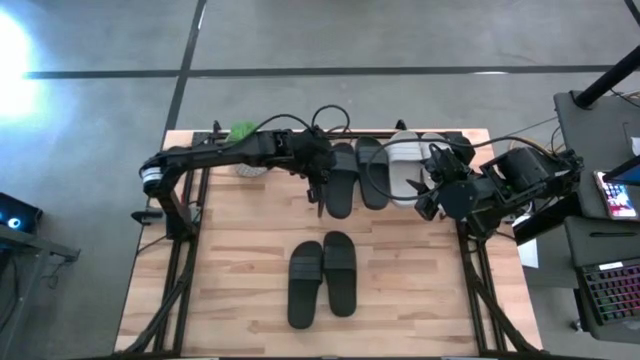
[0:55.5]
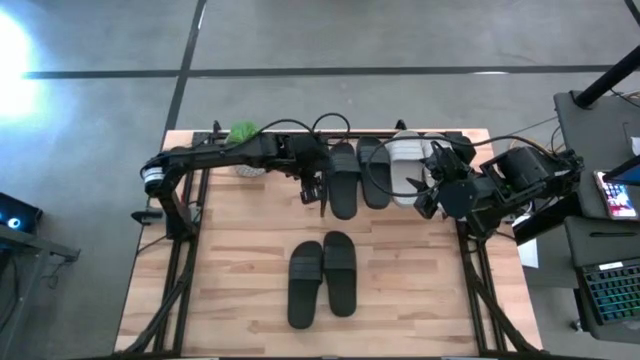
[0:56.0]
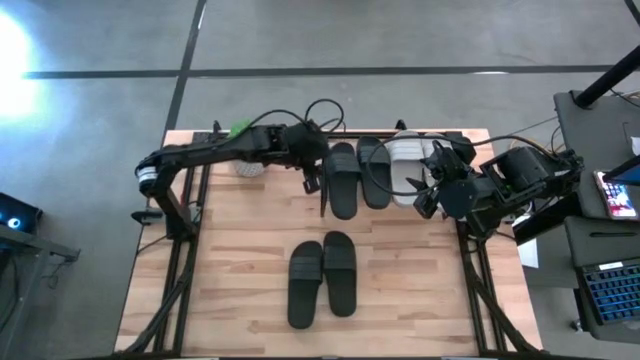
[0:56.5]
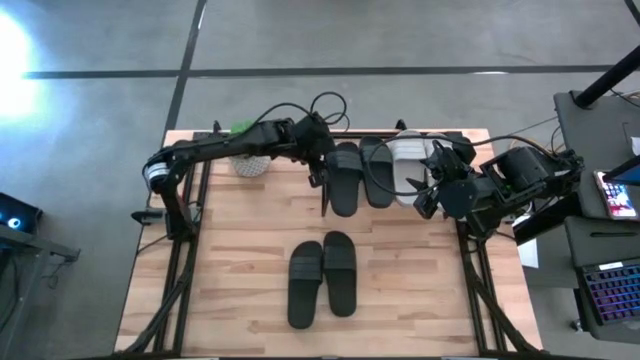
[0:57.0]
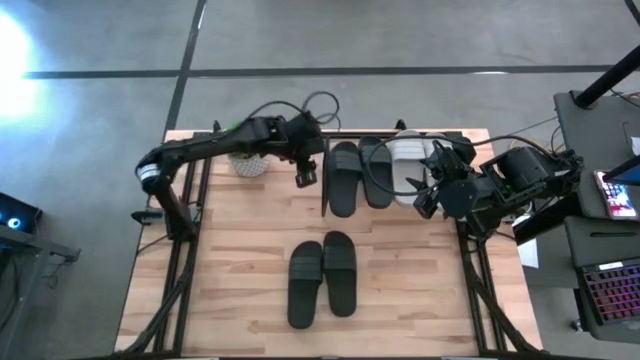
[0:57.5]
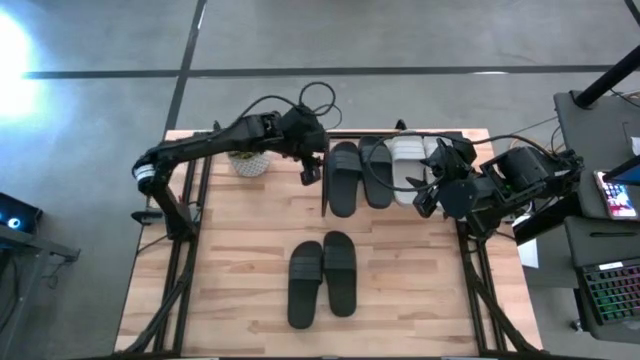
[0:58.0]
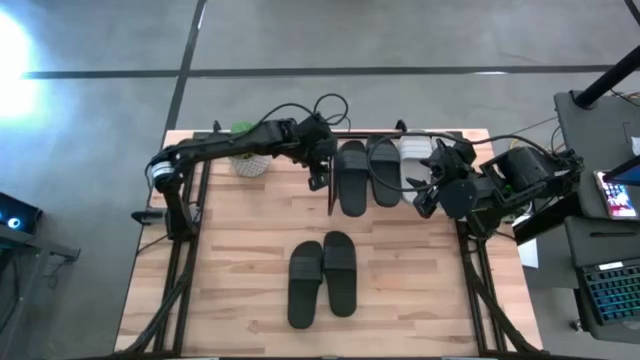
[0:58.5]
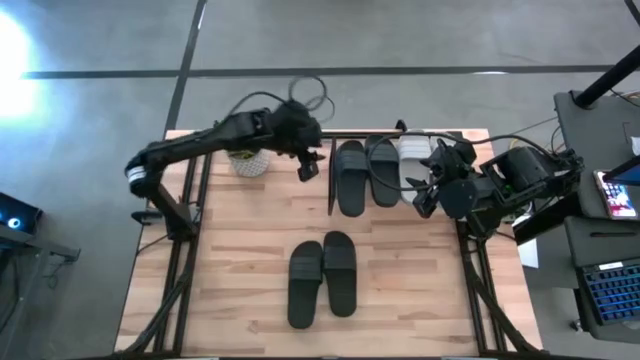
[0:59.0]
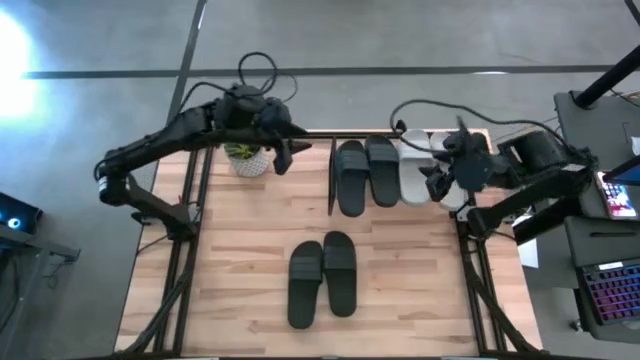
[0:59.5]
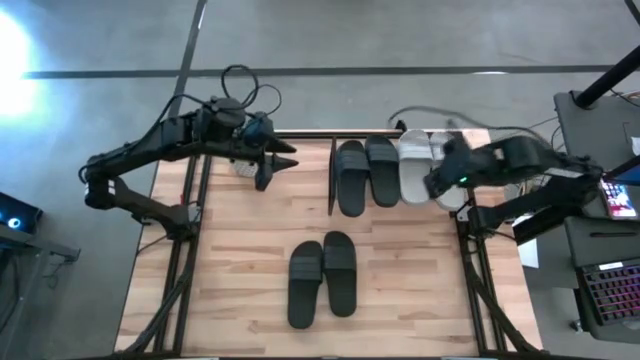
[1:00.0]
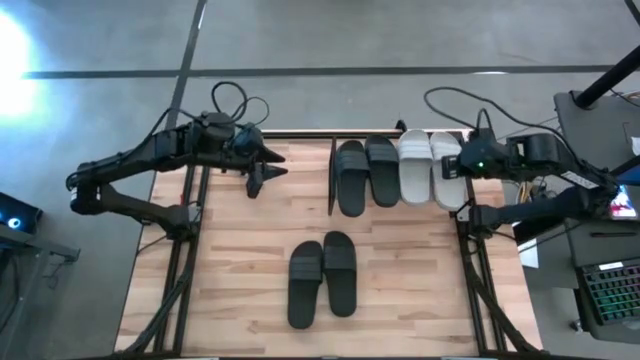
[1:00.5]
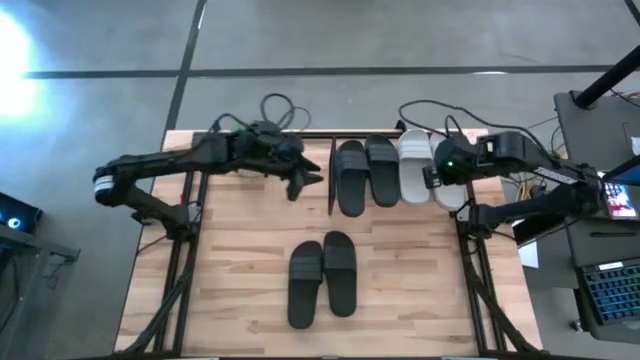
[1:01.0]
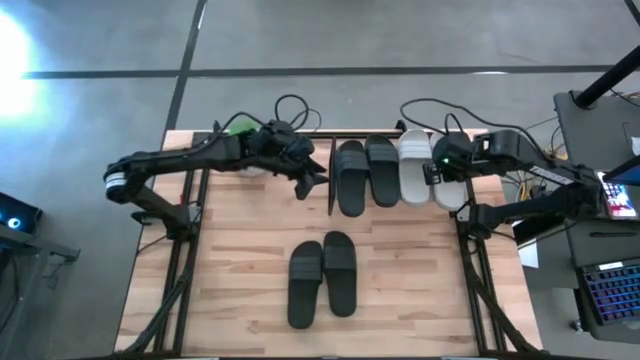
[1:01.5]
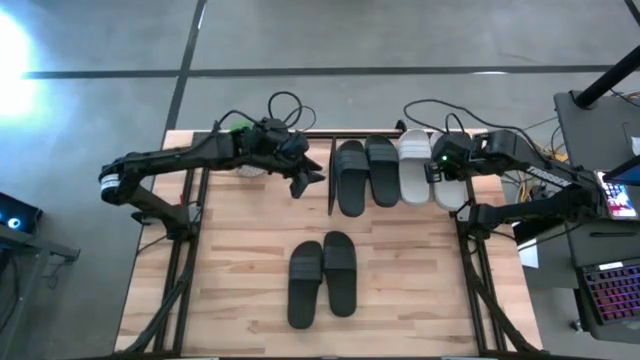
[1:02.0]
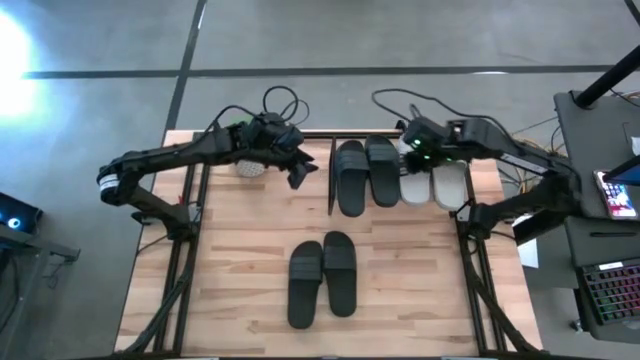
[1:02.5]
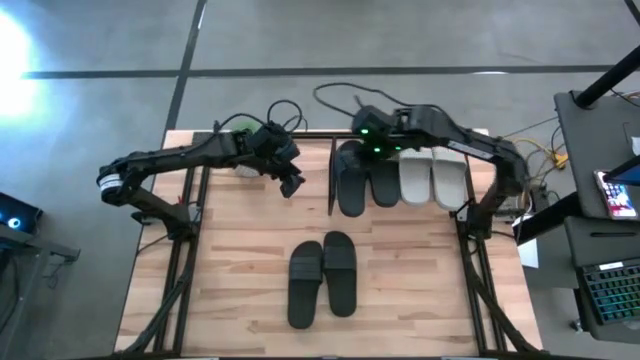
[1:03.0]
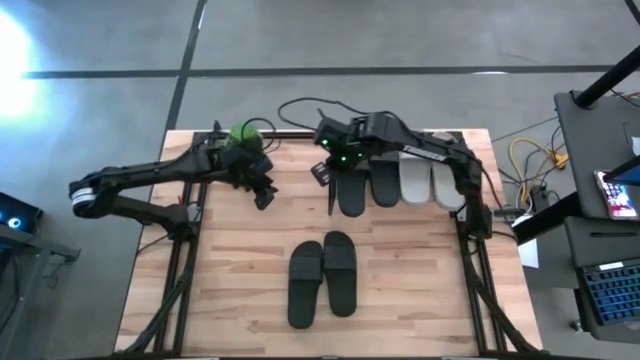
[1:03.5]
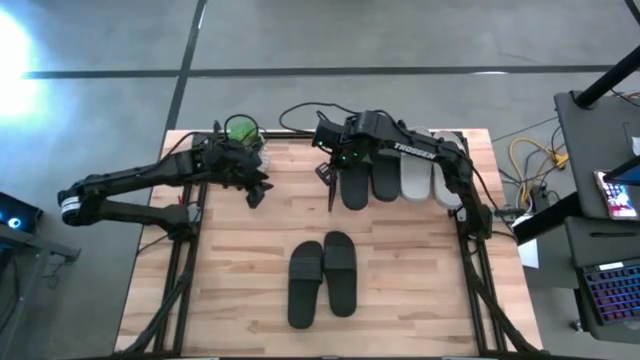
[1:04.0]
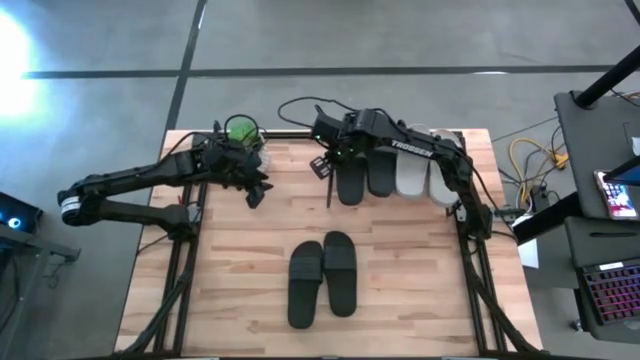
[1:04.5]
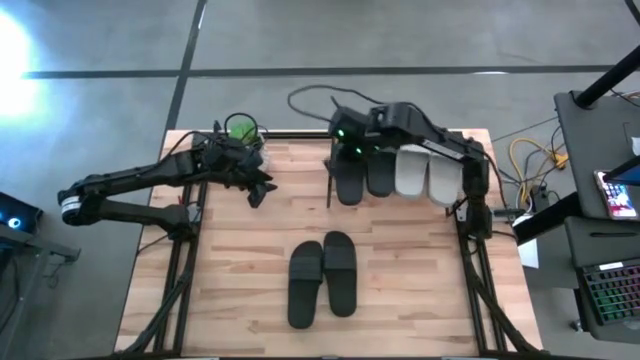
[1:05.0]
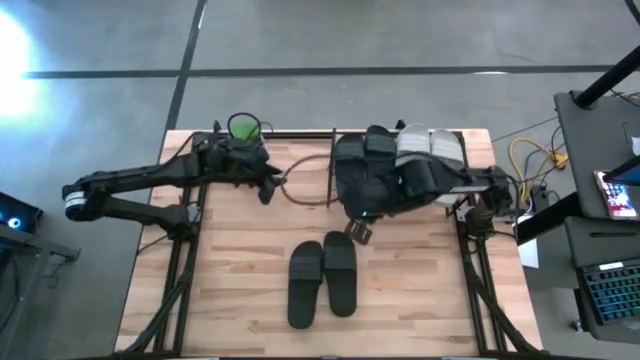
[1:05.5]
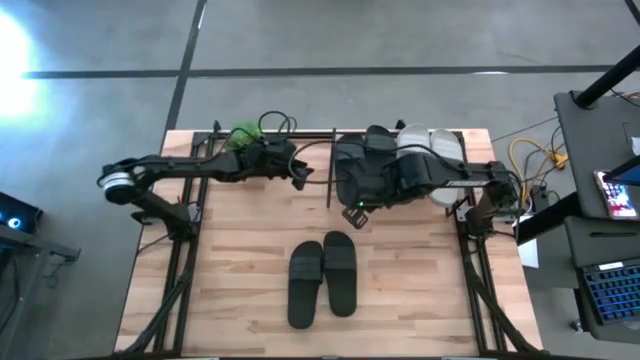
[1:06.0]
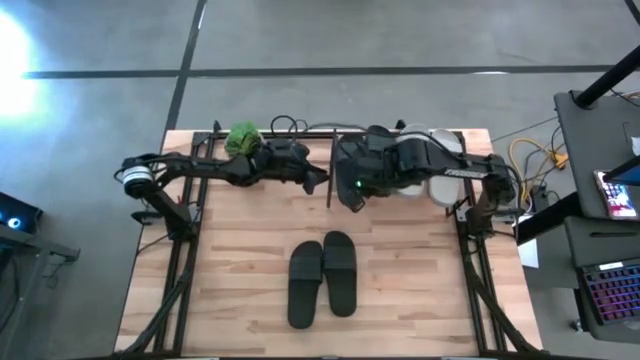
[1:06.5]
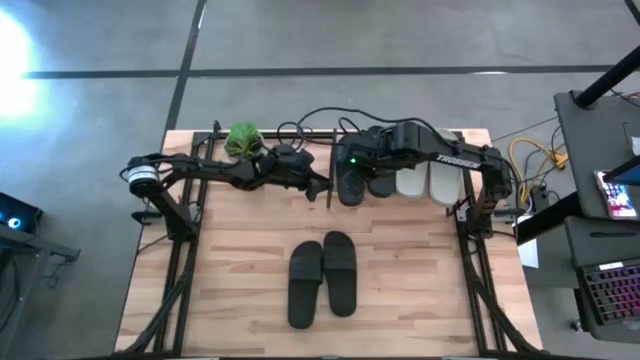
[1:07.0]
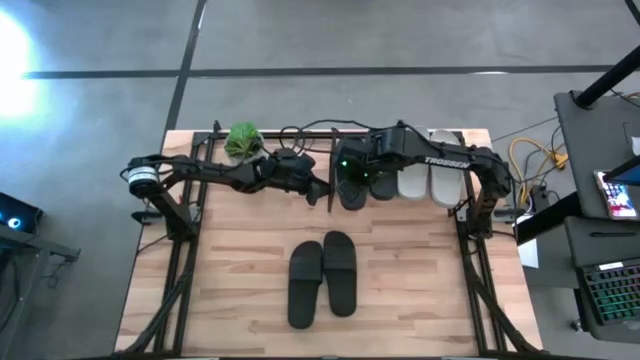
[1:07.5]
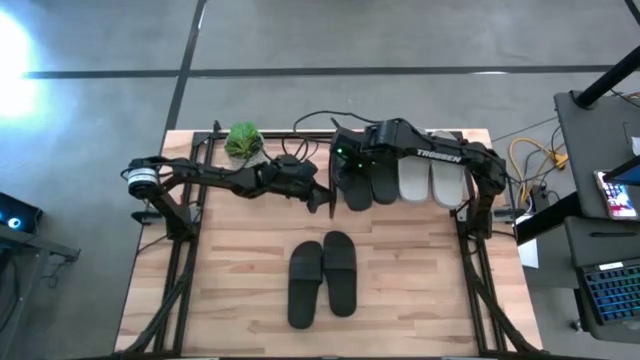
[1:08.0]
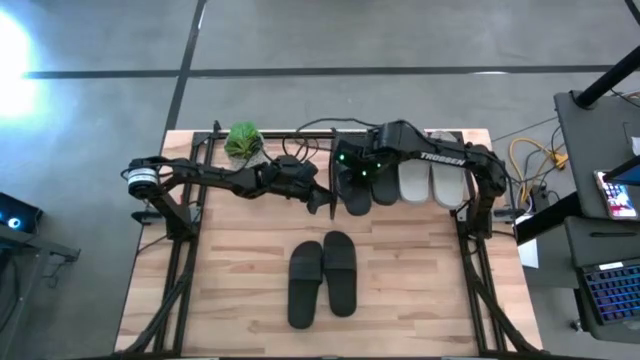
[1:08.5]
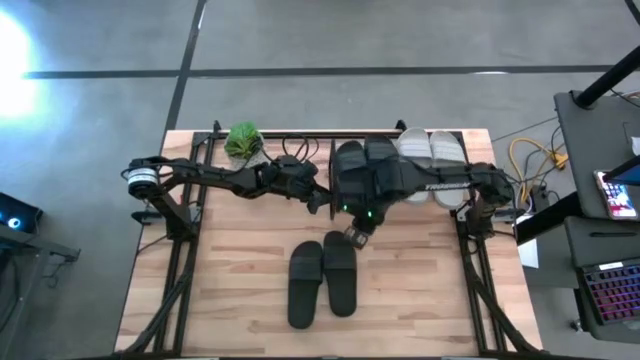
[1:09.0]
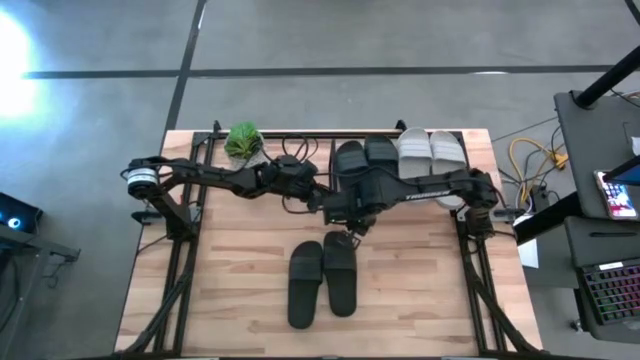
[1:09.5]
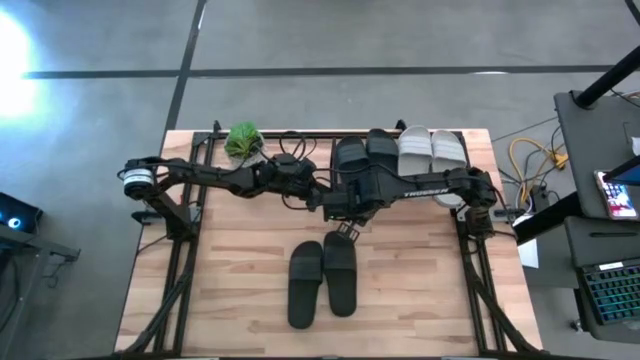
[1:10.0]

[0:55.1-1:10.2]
Task: Pick and place slides into the shelf
Put the black slide on the shelf

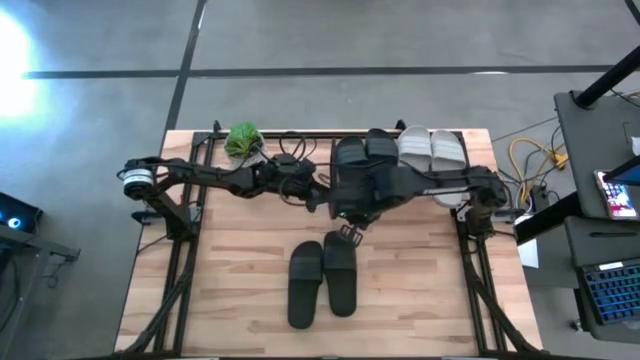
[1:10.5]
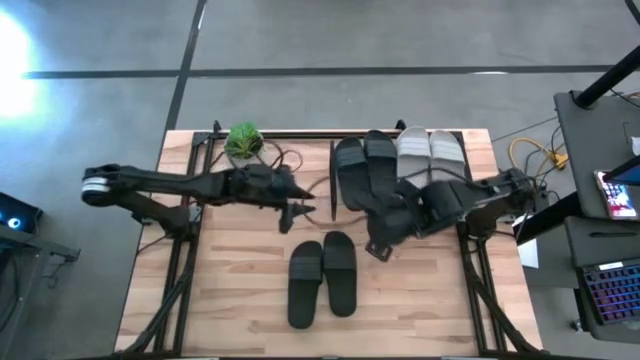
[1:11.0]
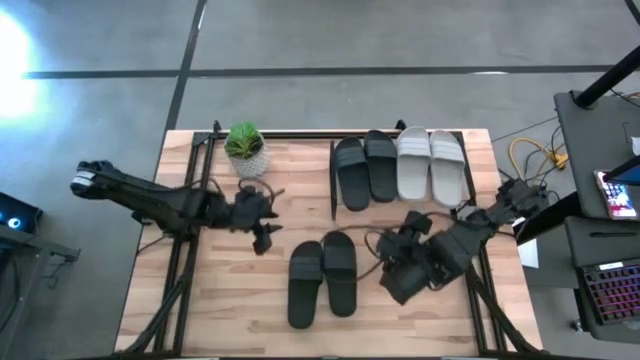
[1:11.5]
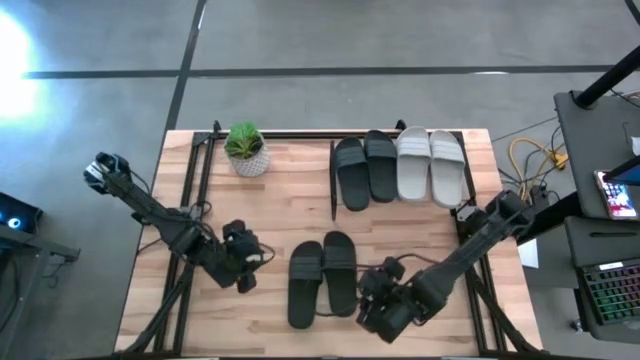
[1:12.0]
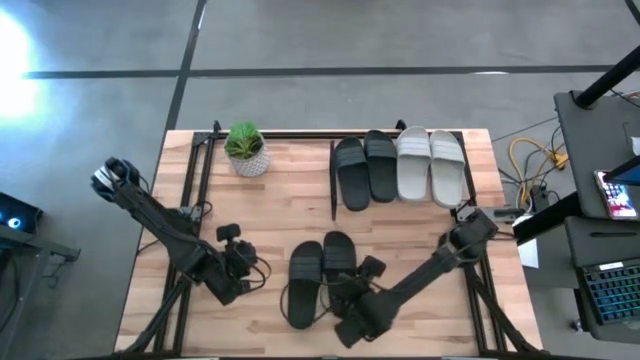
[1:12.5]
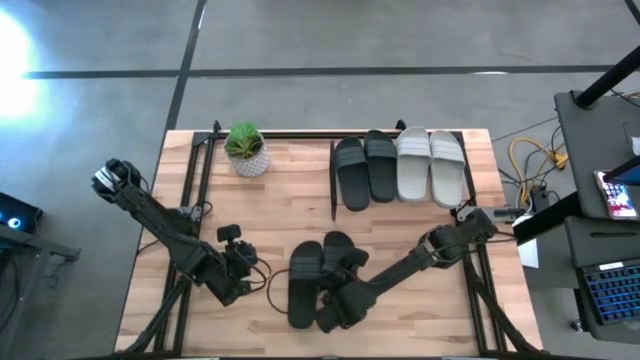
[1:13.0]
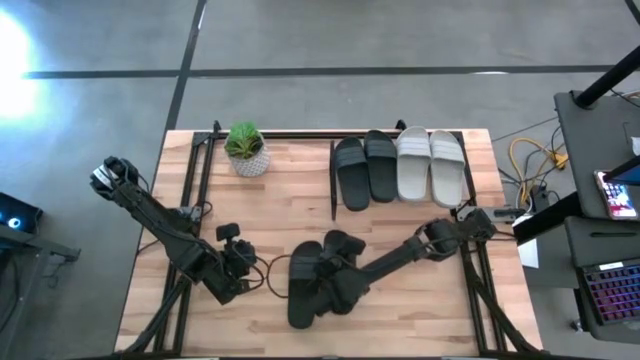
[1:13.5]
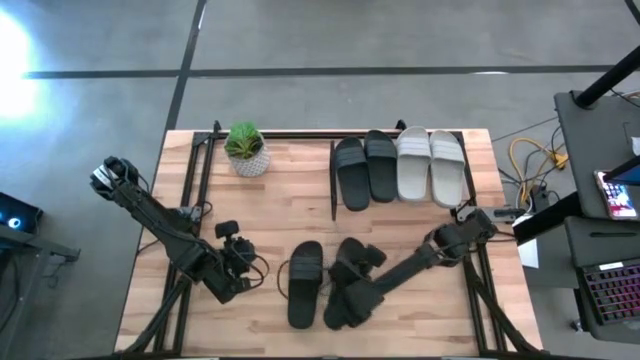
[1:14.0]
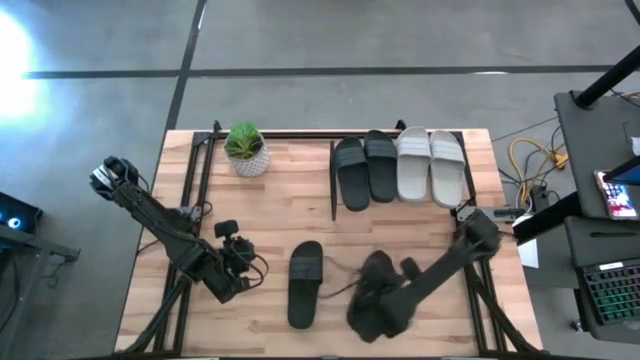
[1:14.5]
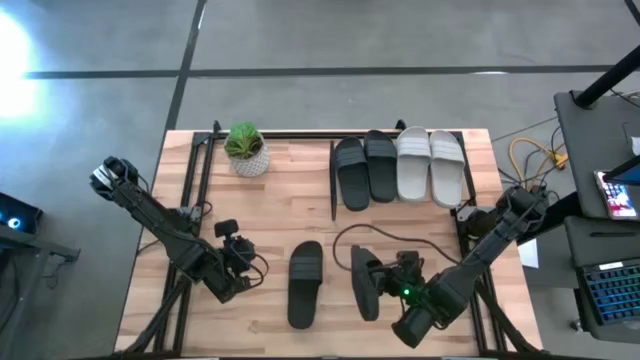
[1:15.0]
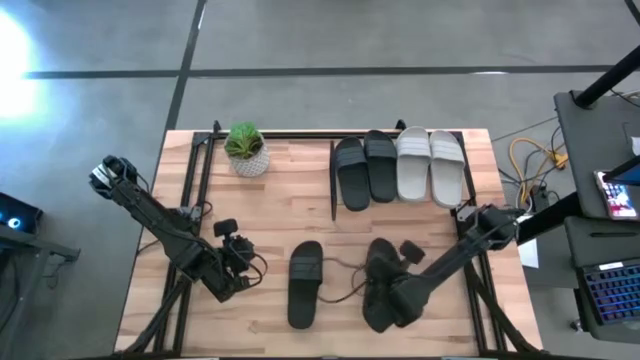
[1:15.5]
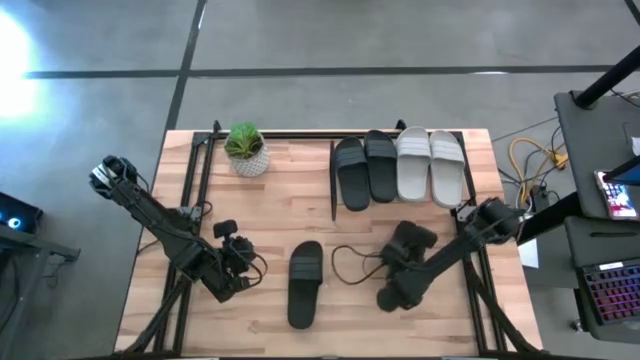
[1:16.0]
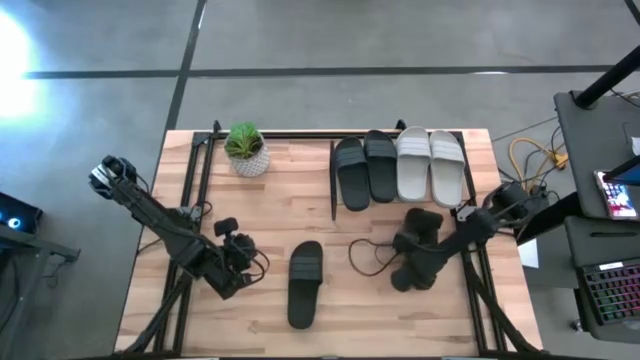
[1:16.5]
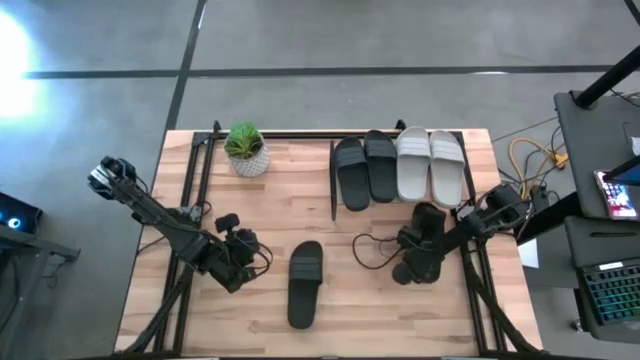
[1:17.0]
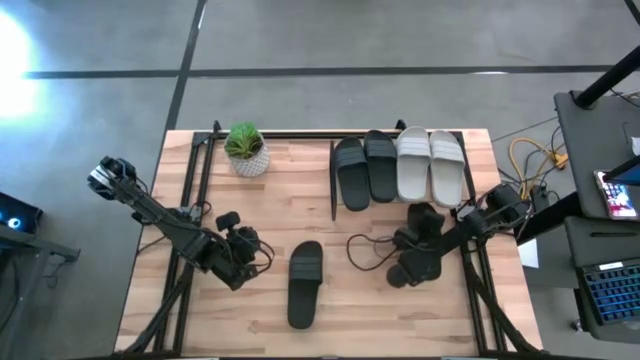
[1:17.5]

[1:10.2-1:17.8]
Put the black slide under the shelf
